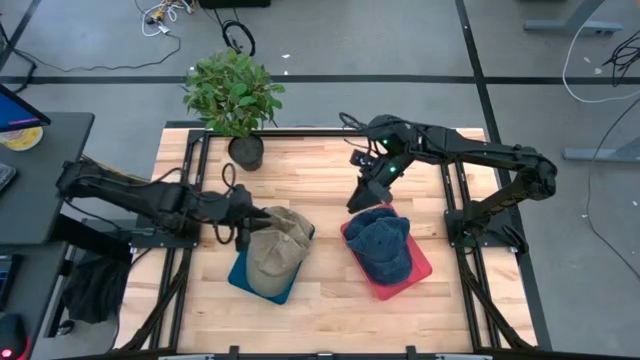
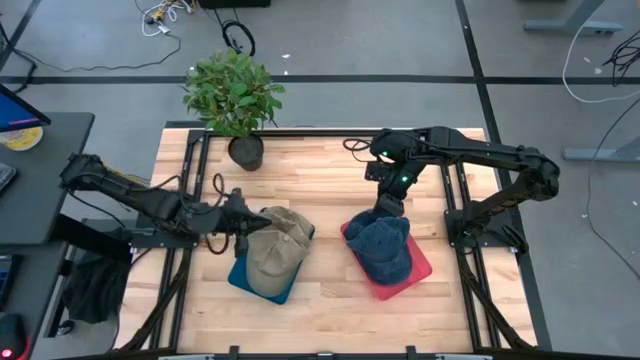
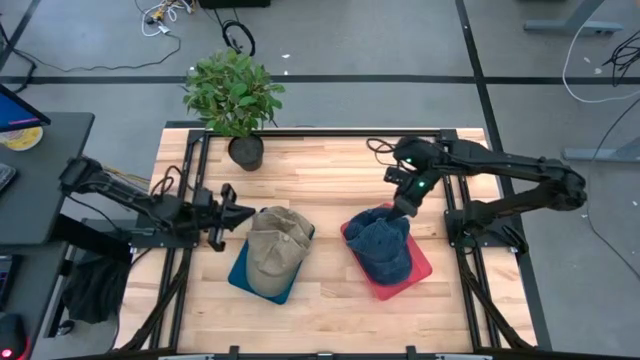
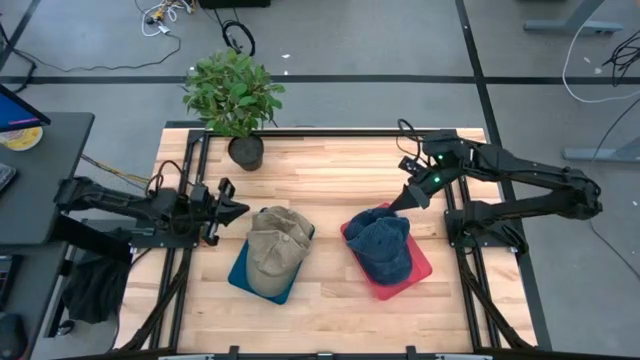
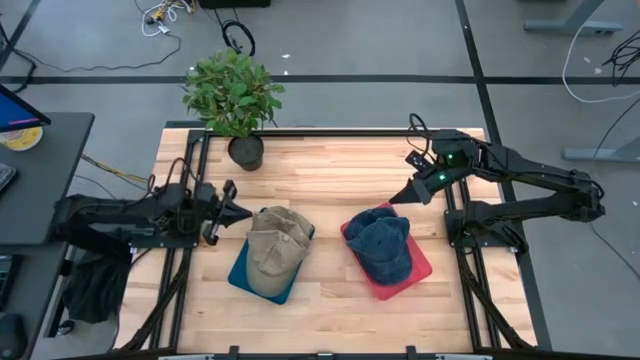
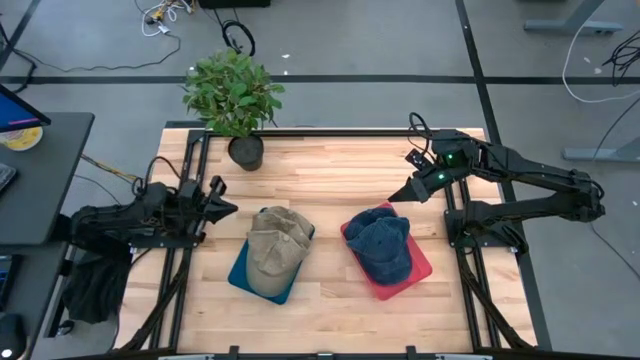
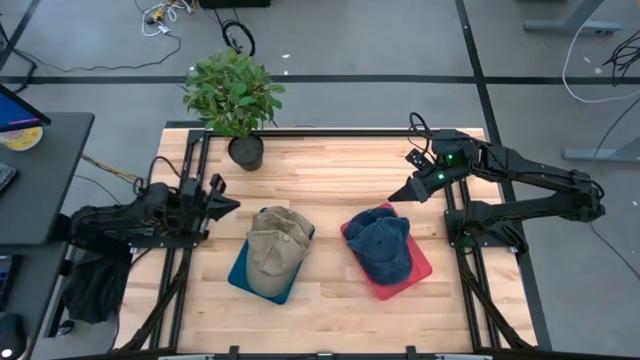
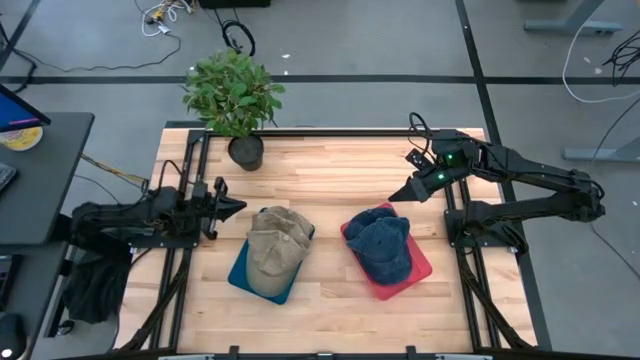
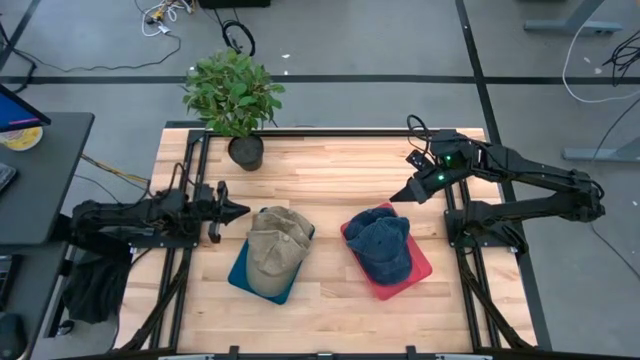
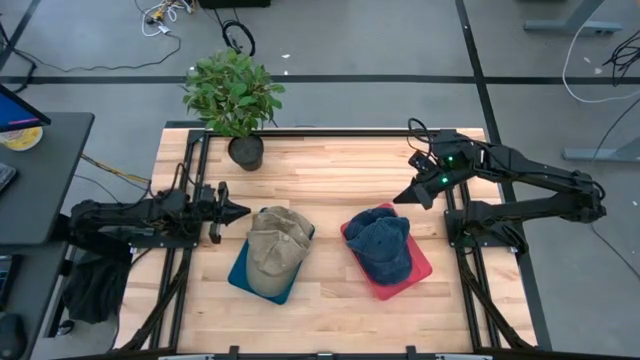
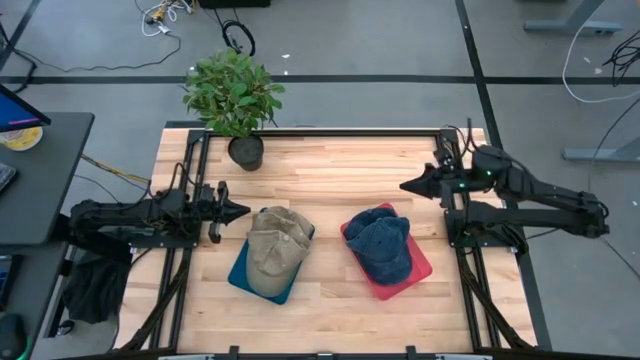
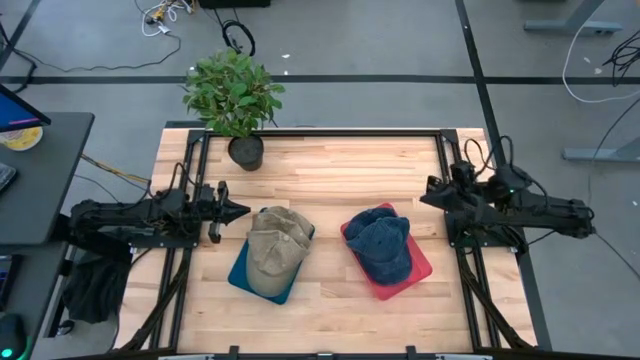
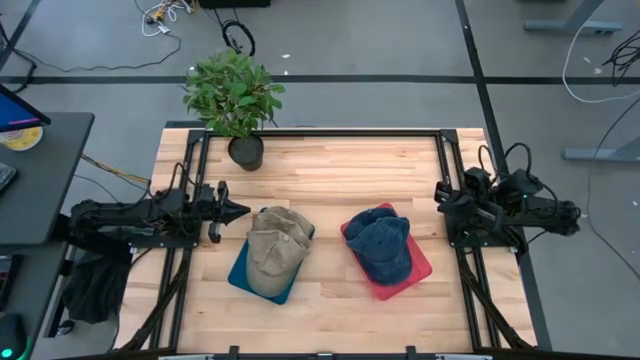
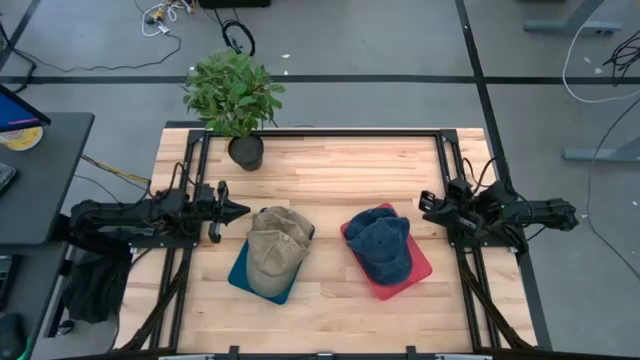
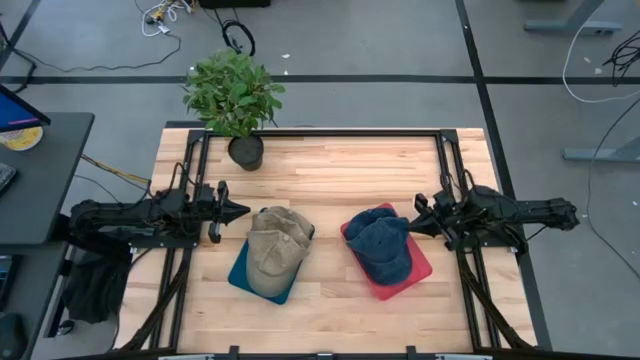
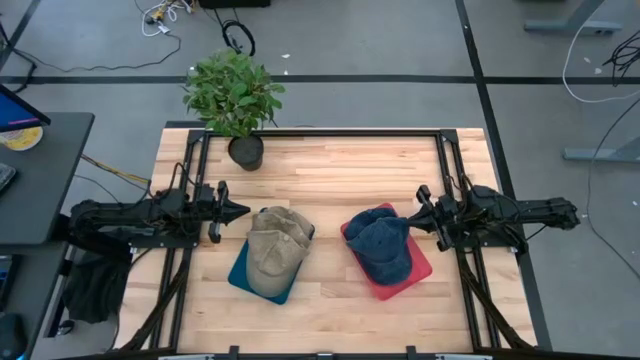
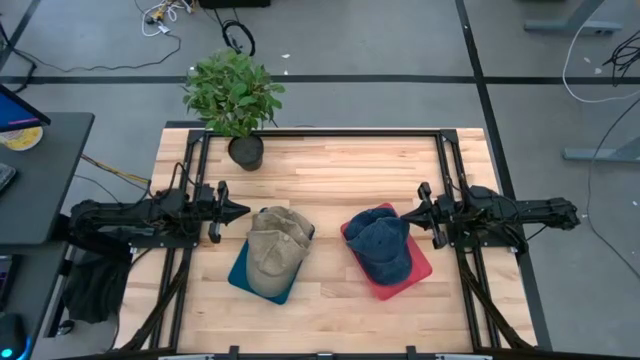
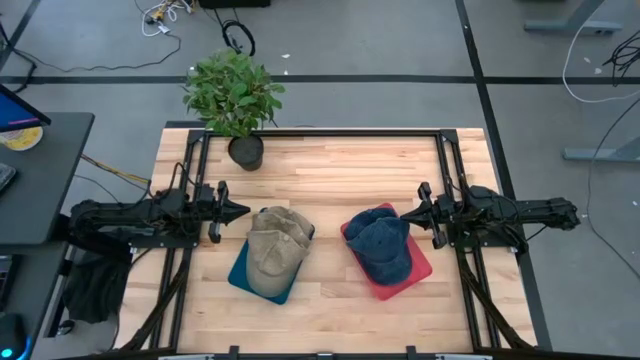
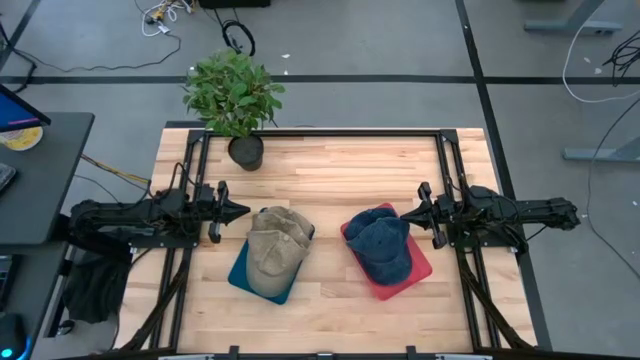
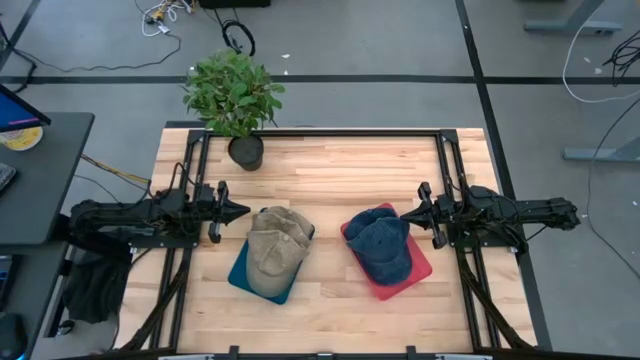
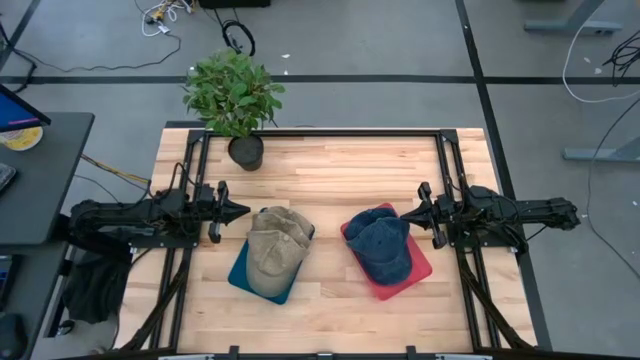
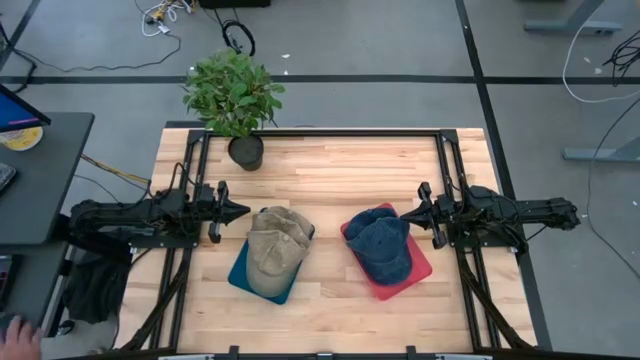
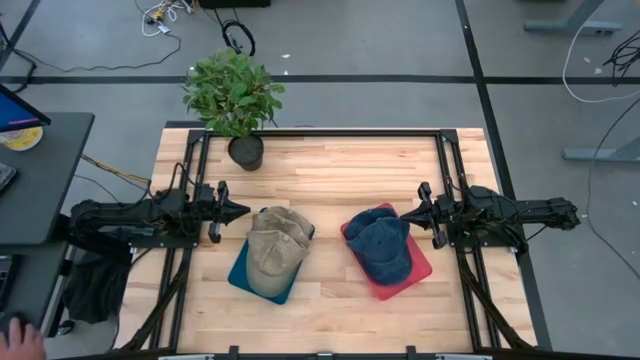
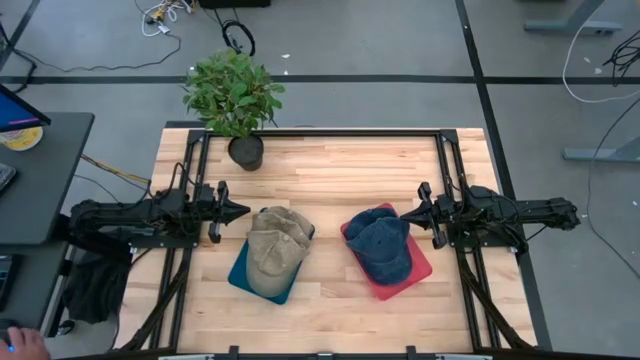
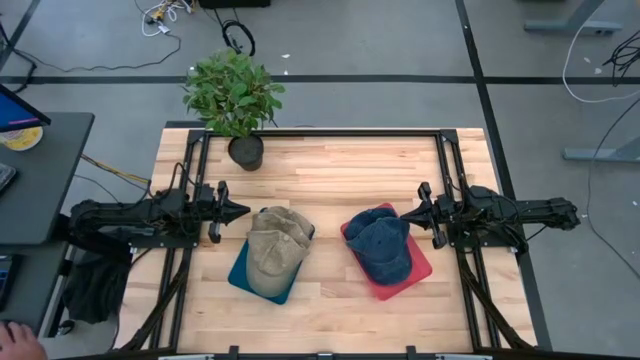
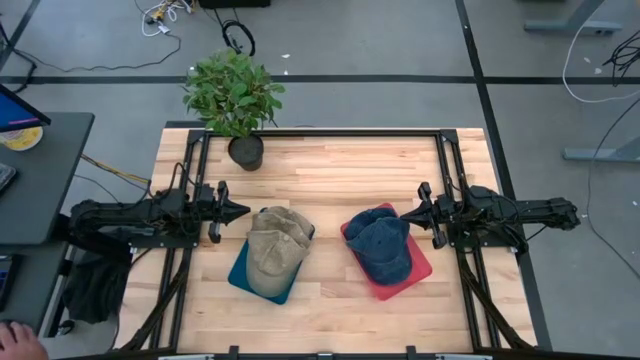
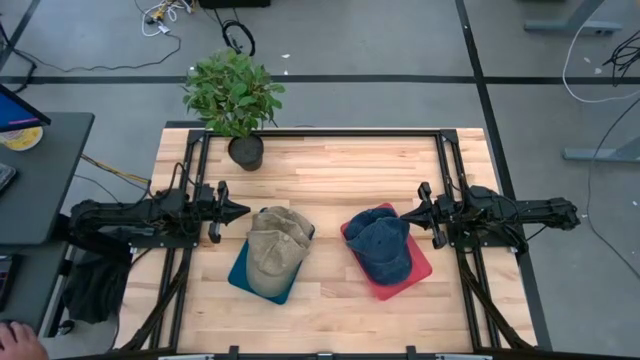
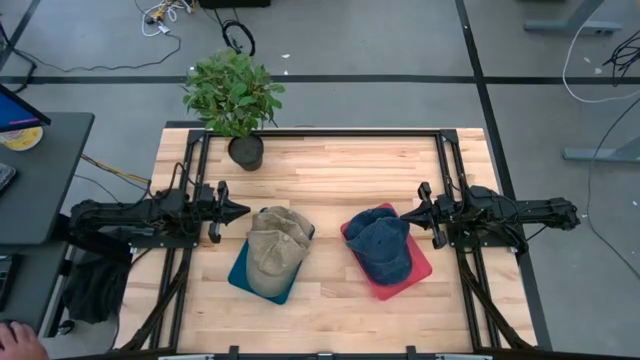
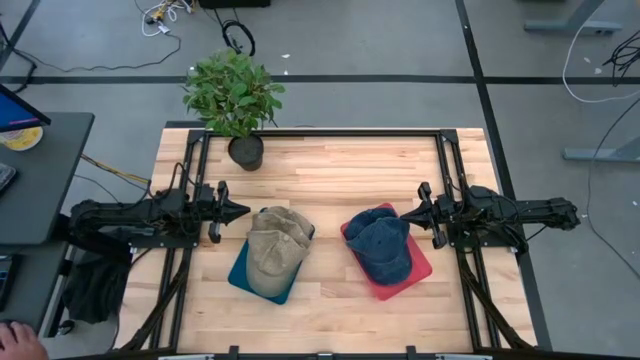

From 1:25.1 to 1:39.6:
Task: Pick & Place hat
Return to Home Position

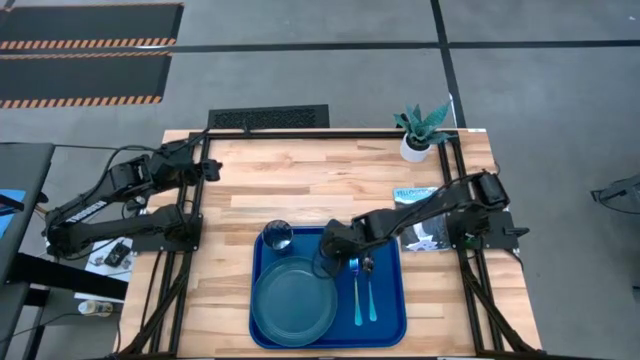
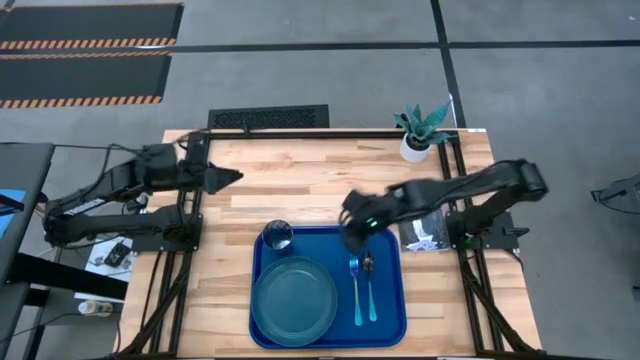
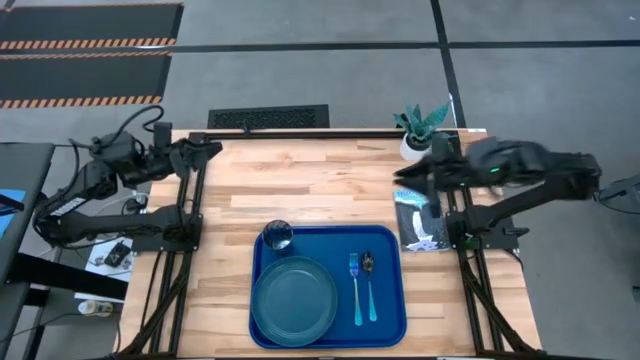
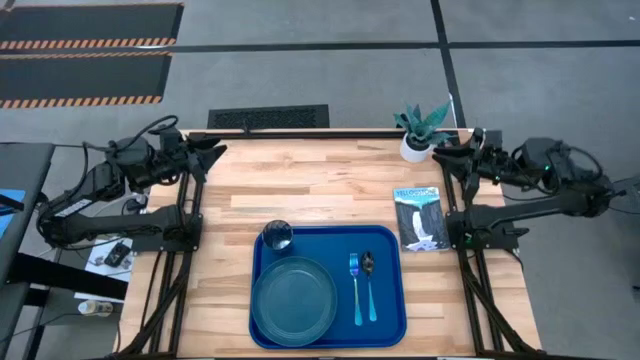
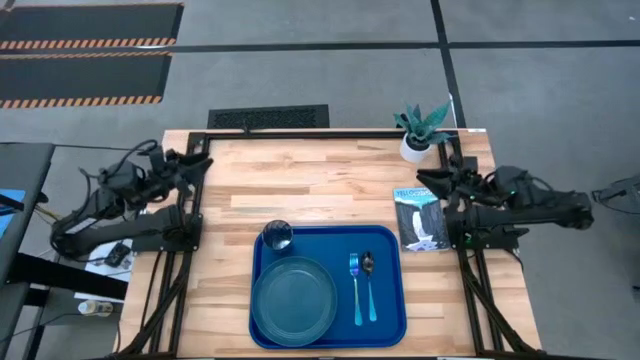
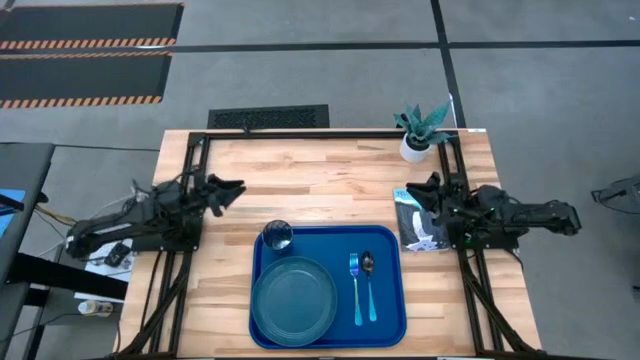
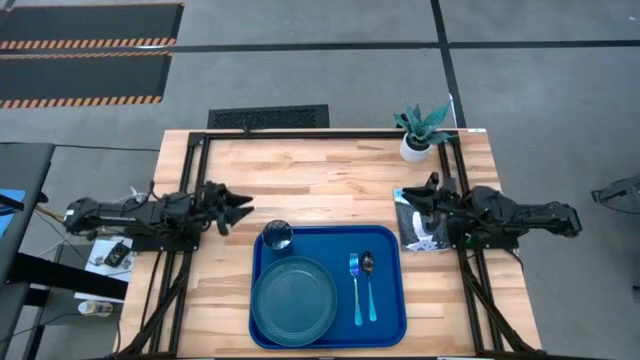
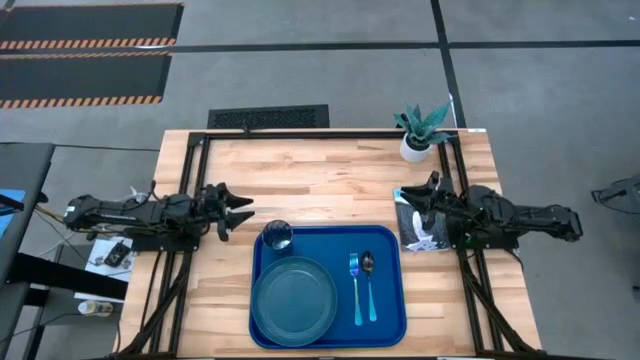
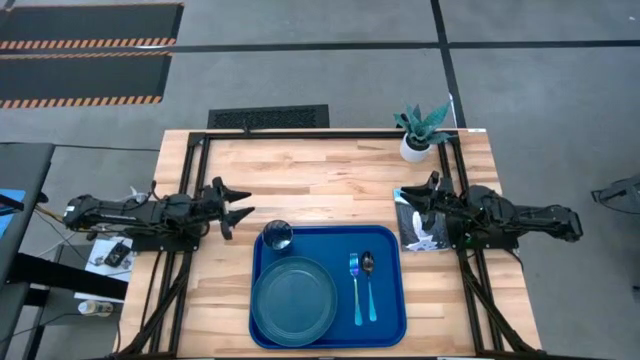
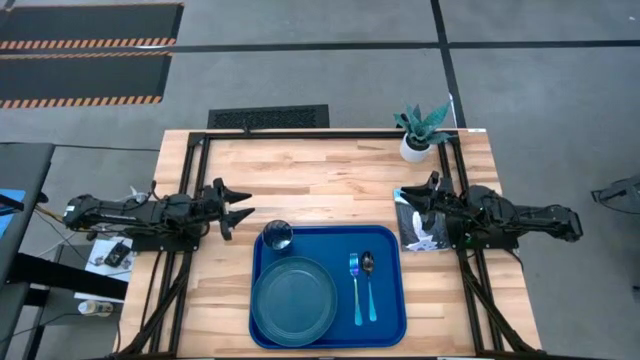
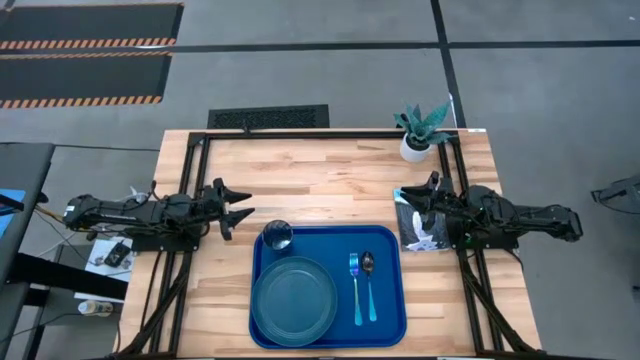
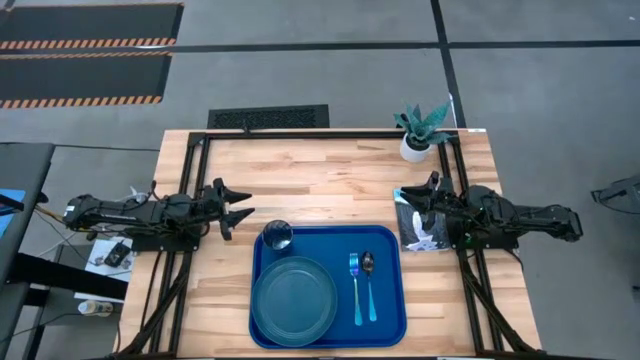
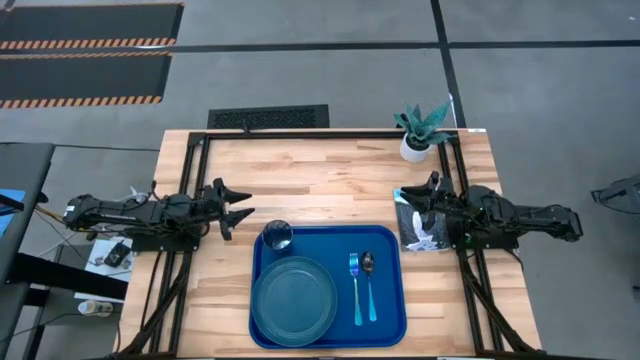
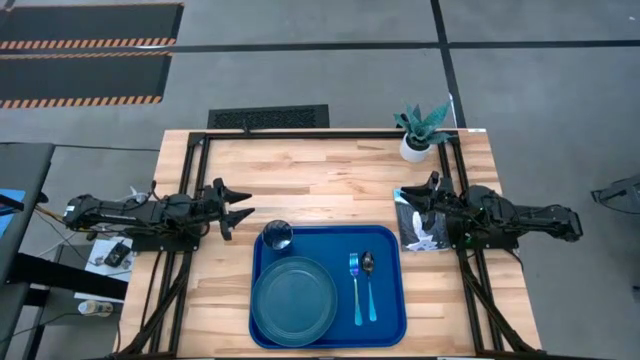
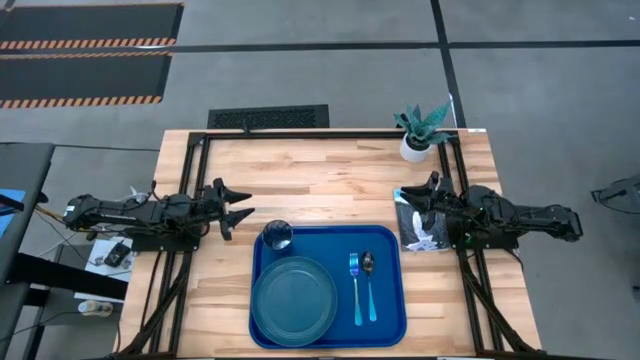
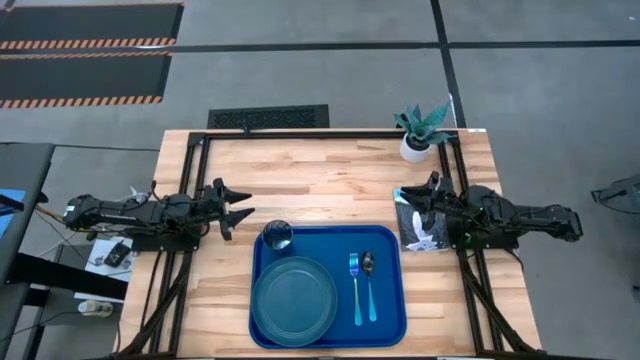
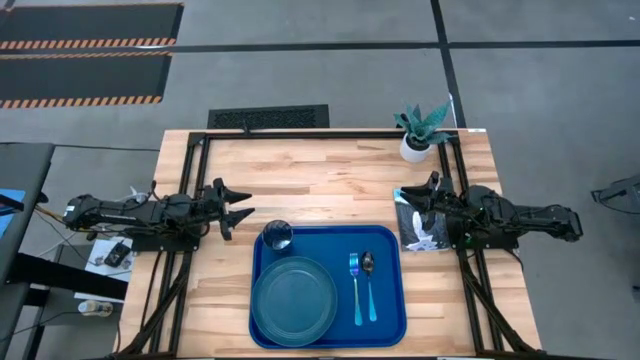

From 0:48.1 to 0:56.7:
Task: Pick and place plate/cup/fork/spoon on tray
Return to Home Position
